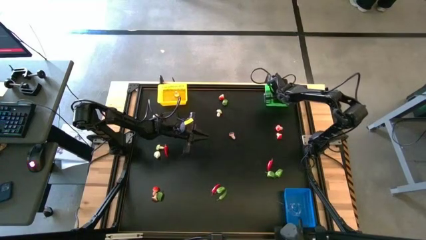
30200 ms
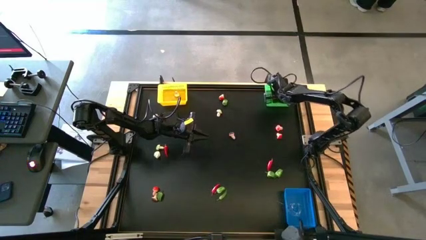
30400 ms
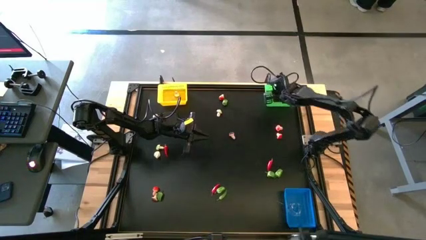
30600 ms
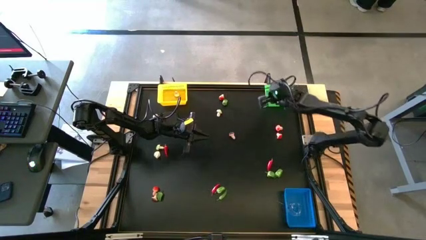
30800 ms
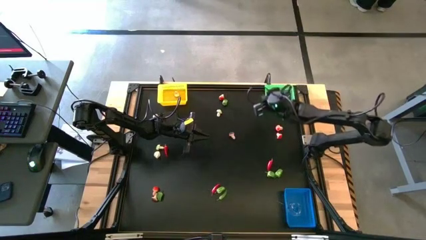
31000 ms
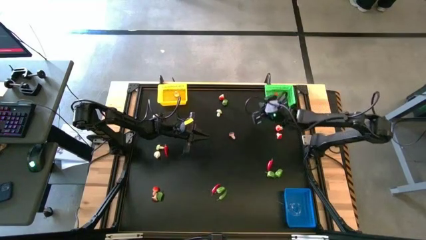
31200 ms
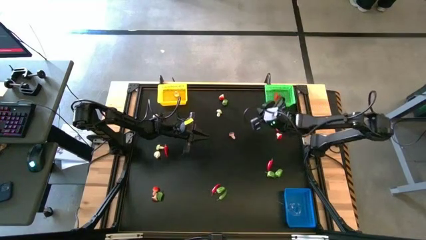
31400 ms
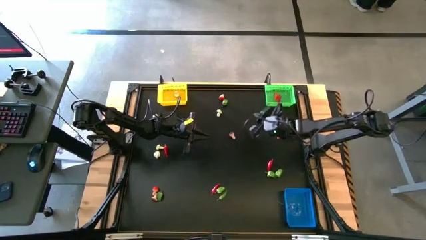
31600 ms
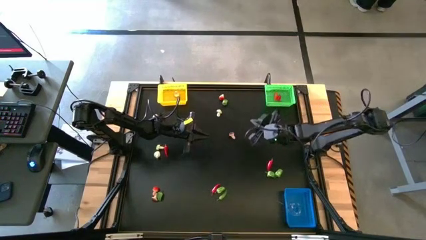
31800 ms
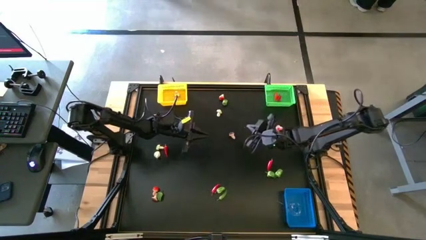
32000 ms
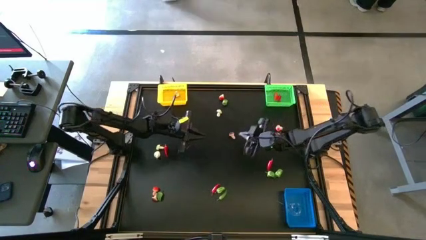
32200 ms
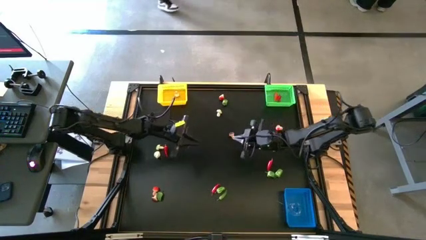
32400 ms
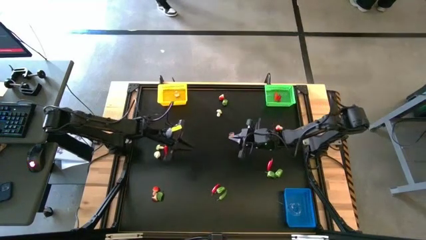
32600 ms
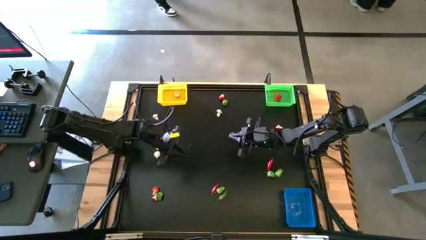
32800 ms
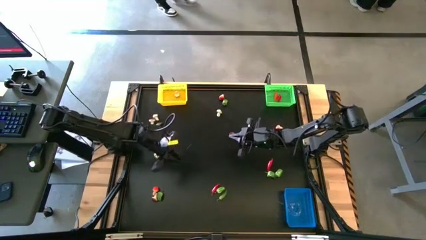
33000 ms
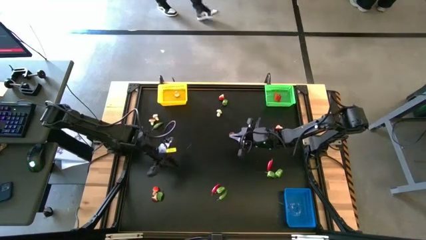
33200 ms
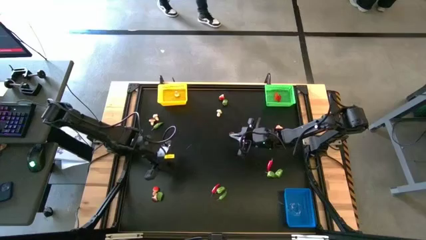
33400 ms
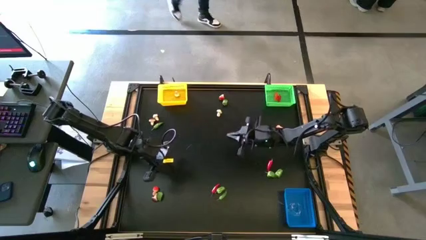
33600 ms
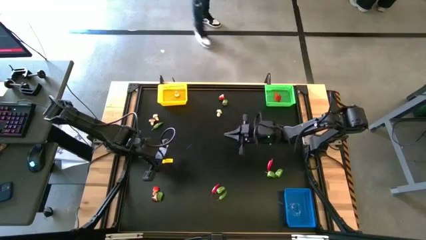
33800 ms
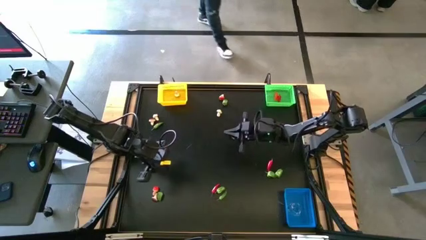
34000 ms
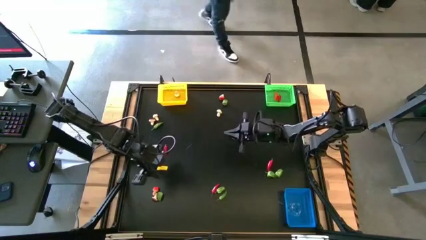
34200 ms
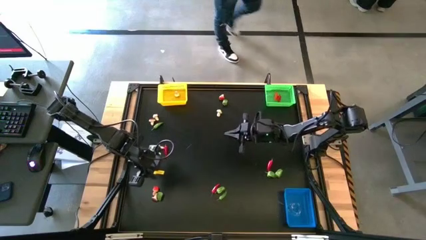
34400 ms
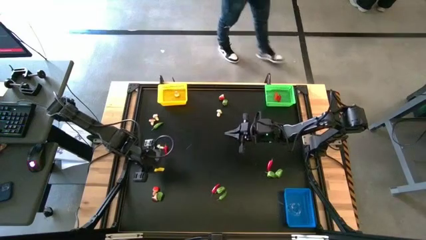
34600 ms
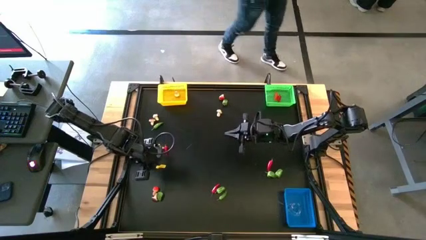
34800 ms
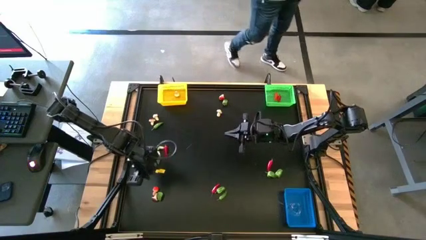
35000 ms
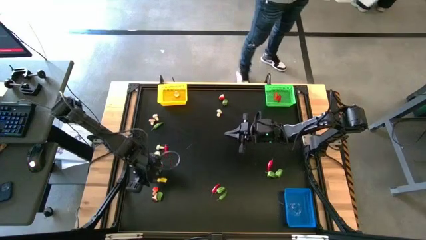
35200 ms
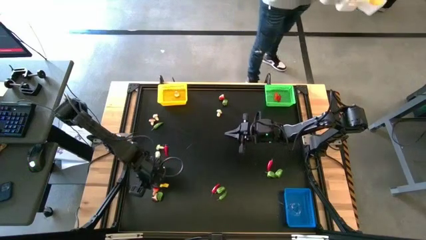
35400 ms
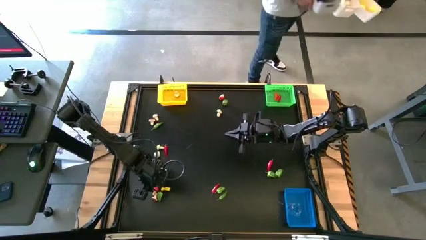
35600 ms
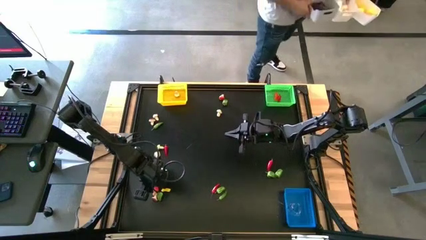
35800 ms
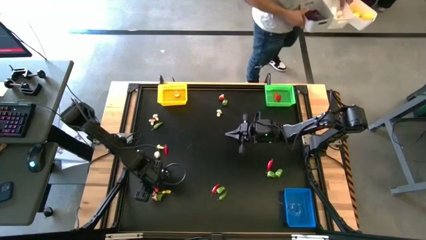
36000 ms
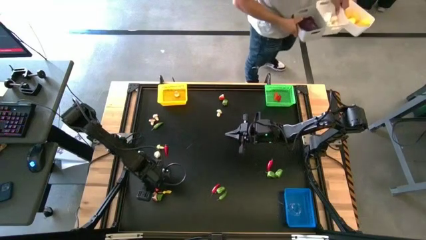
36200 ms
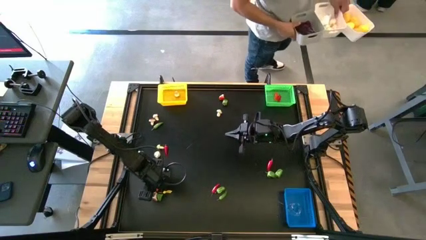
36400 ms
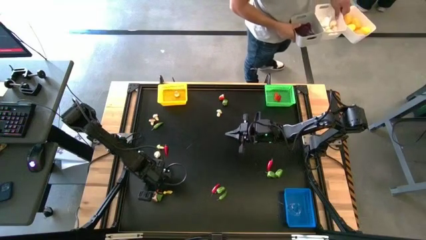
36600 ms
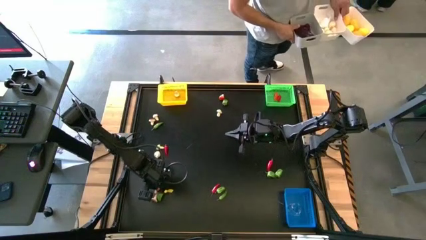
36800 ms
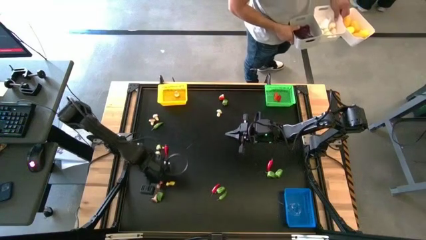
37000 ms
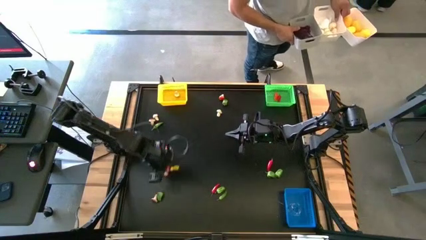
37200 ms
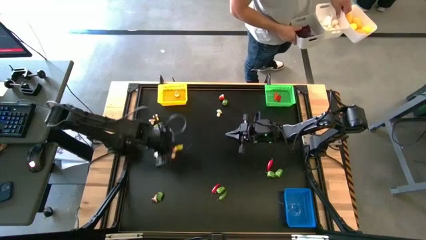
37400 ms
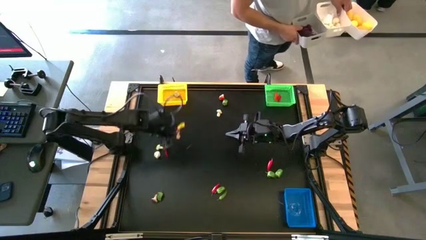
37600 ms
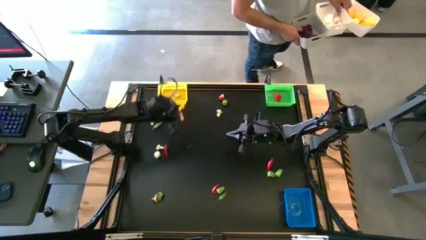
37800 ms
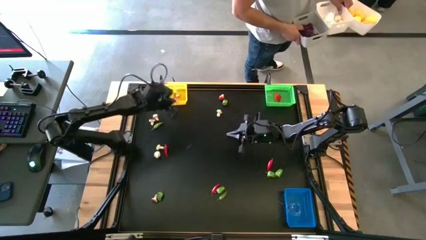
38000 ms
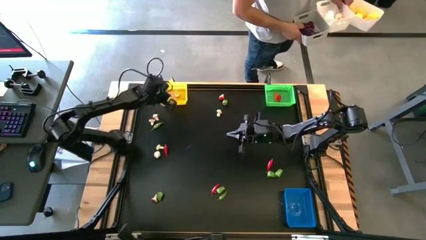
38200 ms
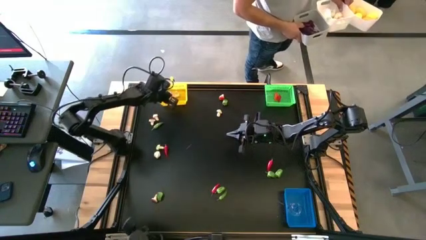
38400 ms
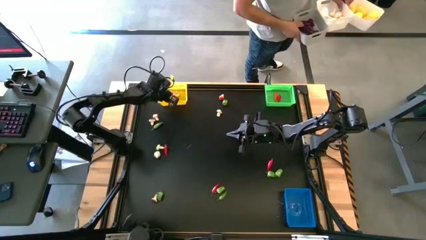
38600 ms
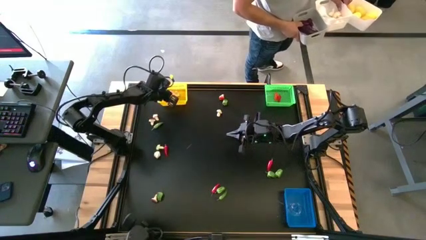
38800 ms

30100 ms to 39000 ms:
Task: Sort produce into baskets
Put the red mushroom into the yellow bin

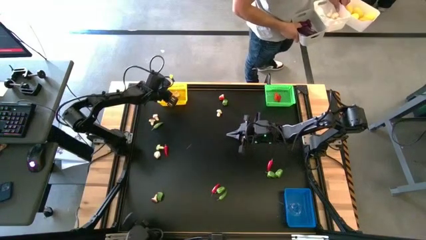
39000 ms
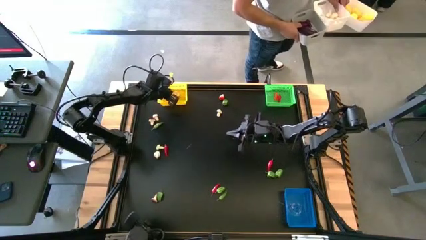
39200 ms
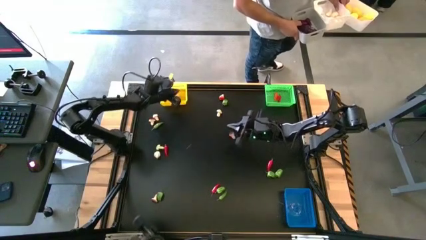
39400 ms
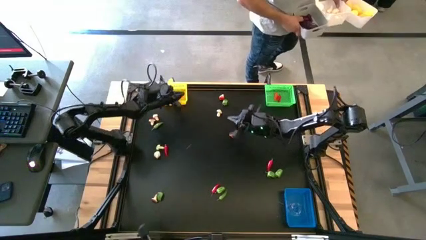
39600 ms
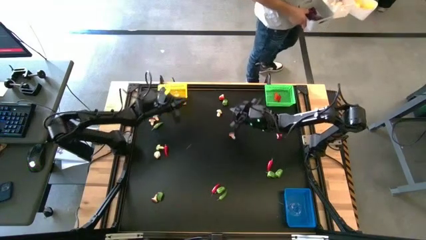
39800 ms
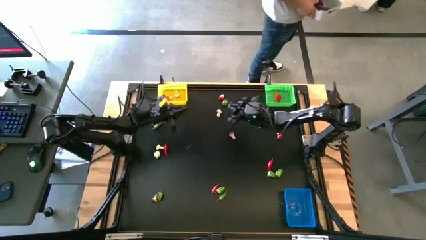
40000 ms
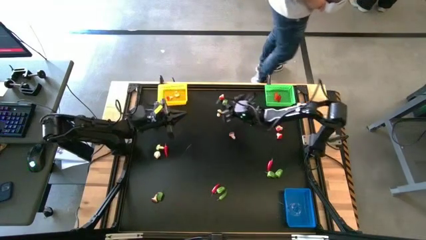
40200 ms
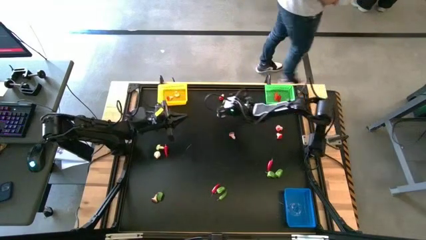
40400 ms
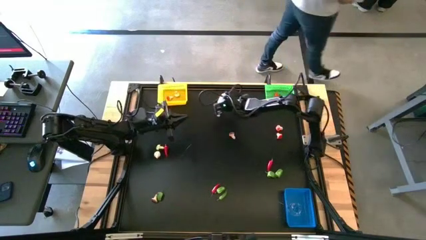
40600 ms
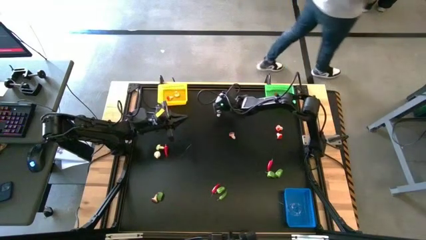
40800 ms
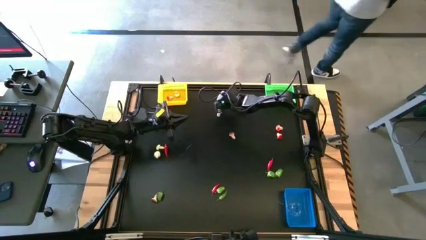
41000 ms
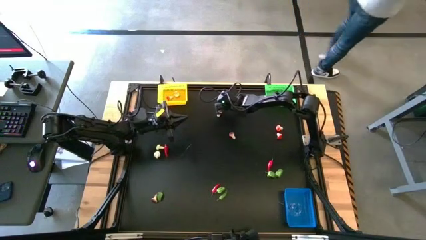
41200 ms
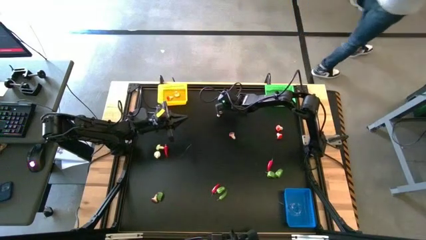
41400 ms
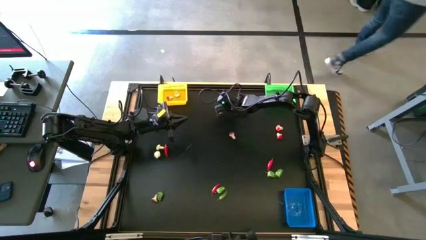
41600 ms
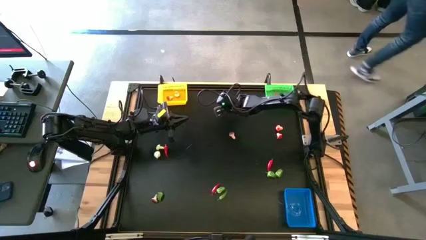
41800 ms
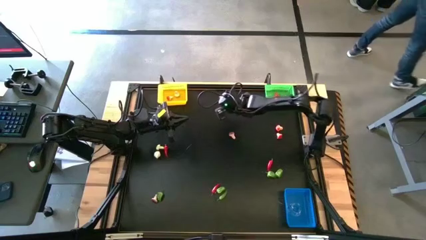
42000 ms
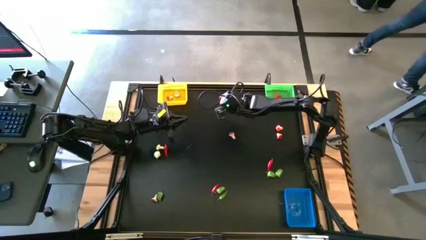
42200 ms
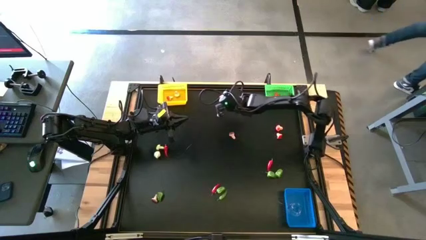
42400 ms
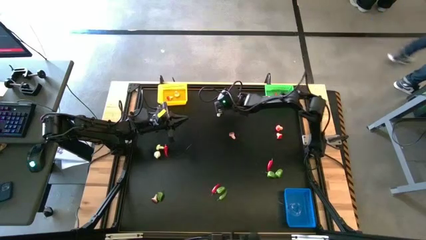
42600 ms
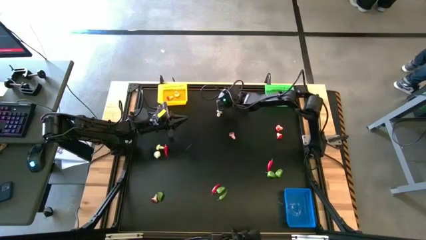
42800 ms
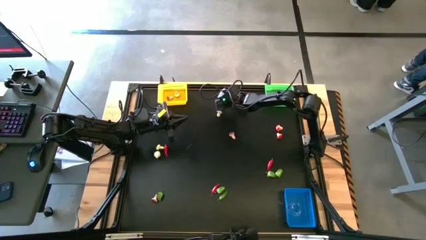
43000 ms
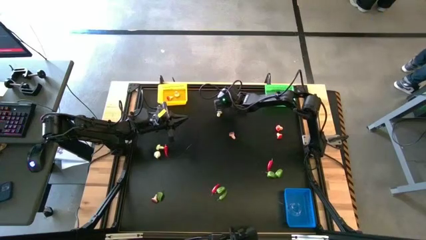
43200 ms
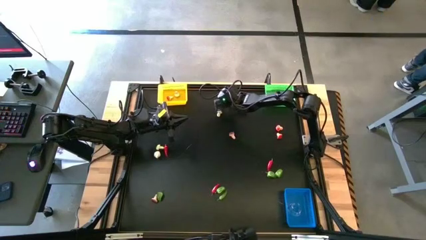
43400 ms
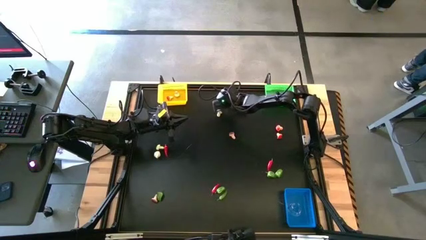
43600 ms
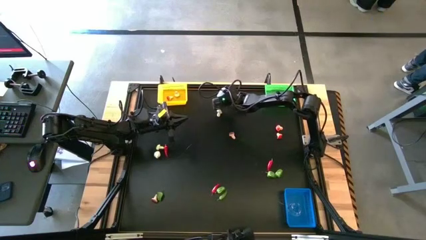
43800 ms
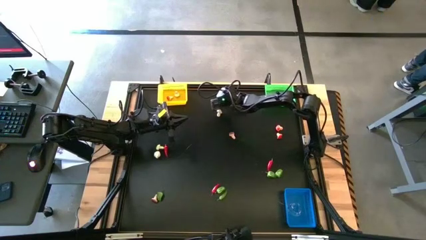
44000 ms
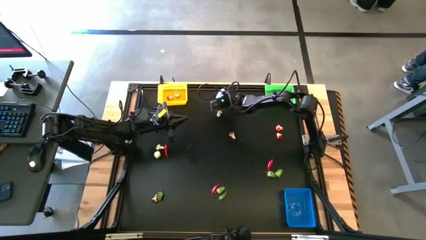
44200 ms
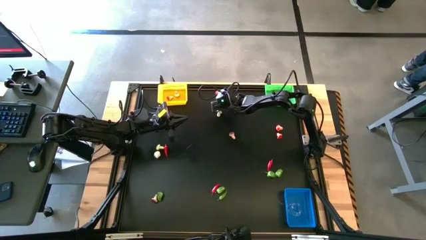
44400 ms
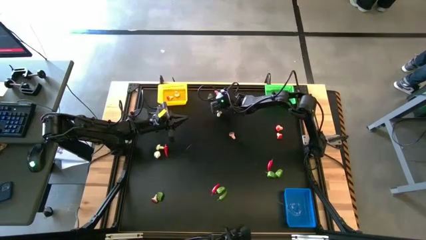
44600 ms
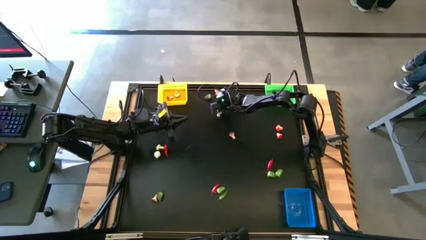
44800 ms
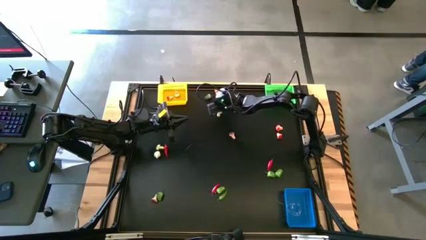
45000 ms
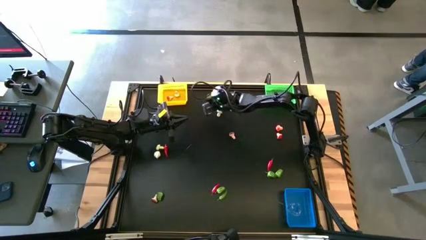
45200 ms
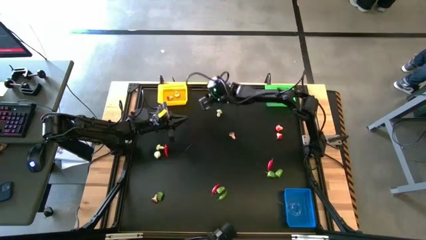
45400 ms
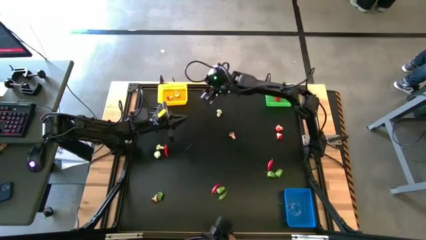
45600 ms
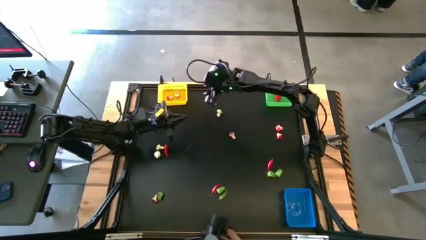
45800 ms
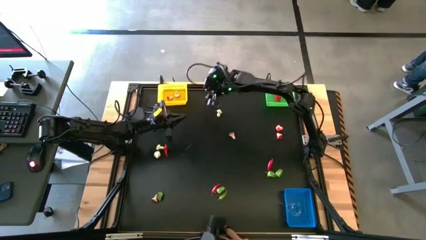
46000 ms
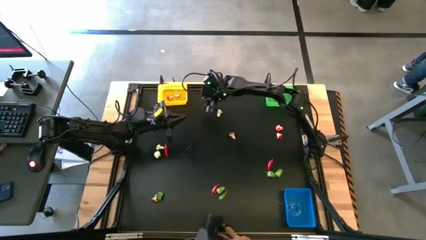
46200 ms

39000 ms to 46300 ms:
Put the green bell pepper into the blue bin
